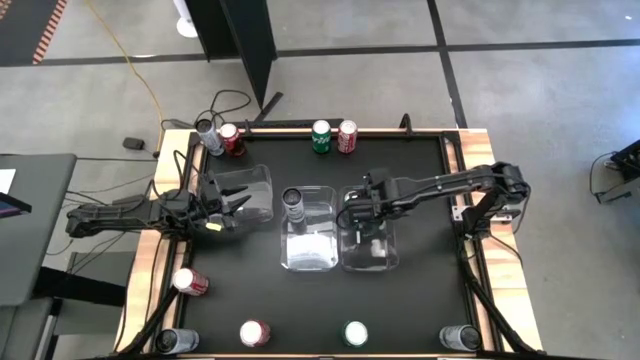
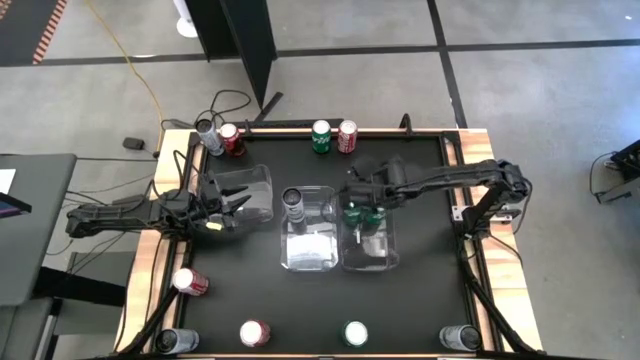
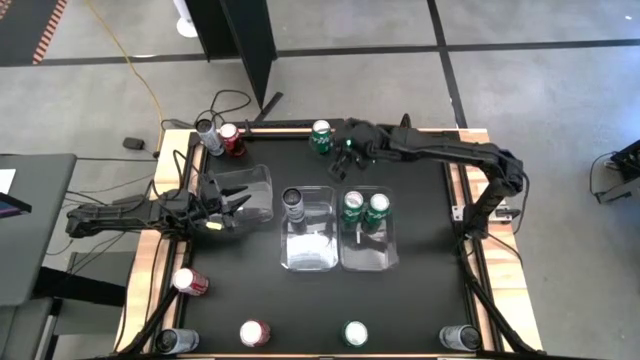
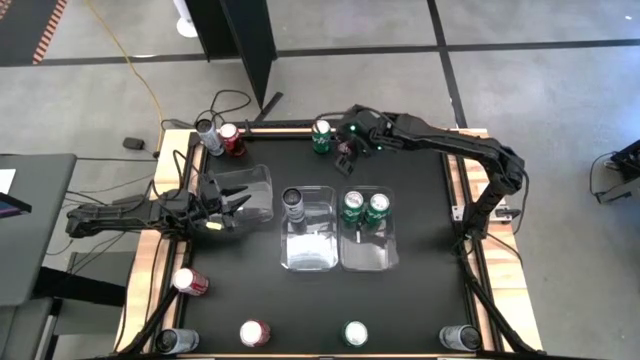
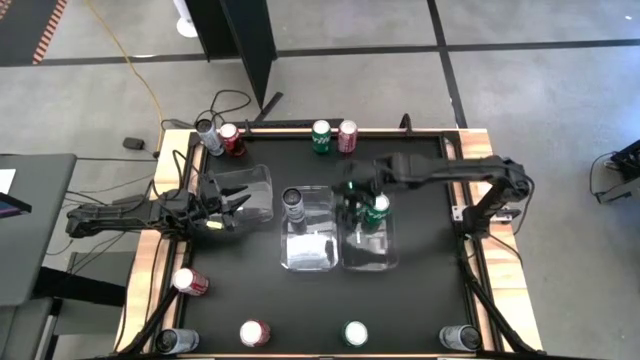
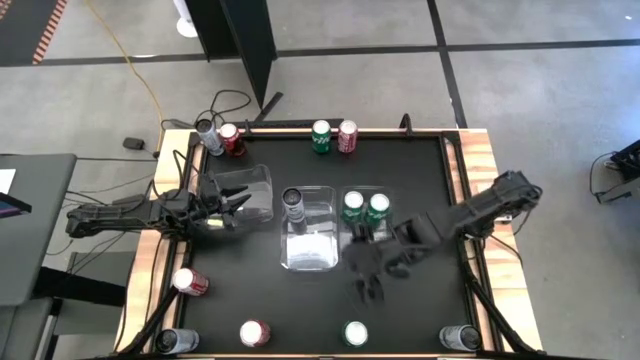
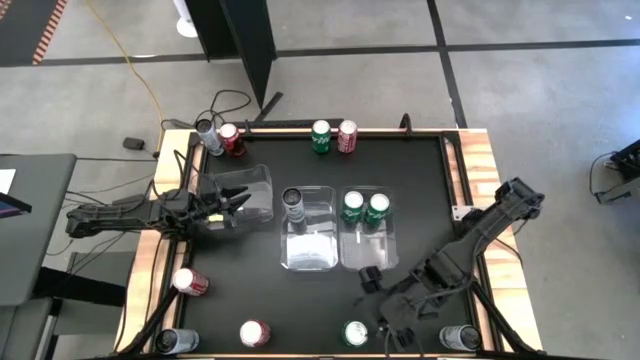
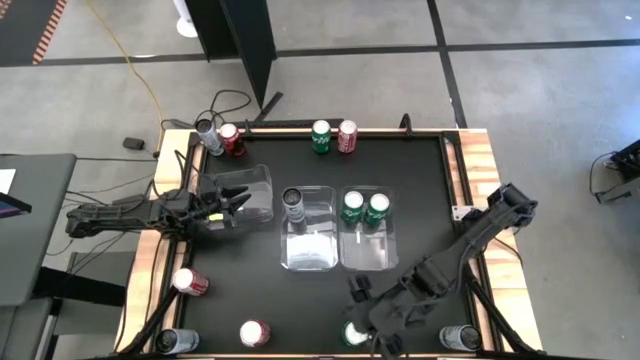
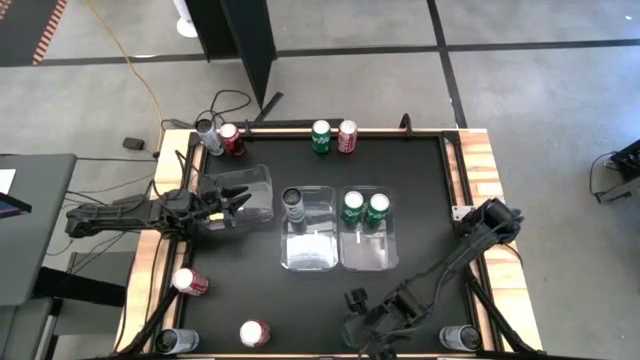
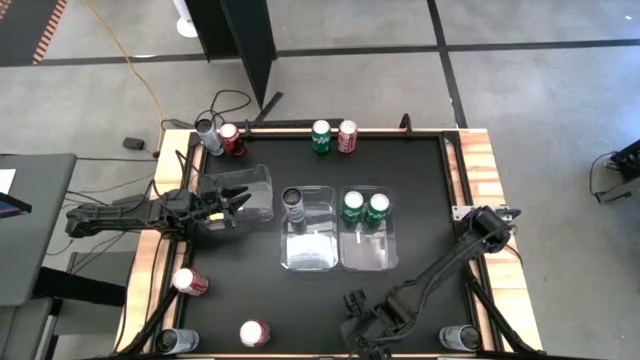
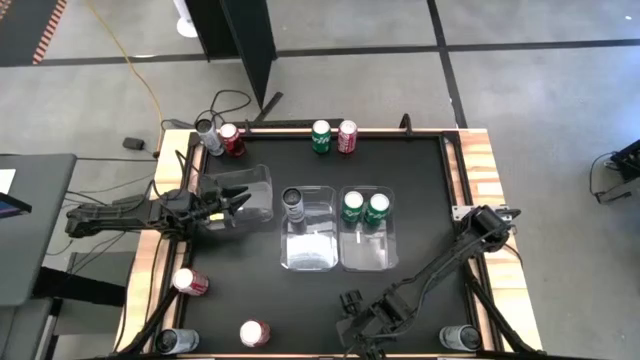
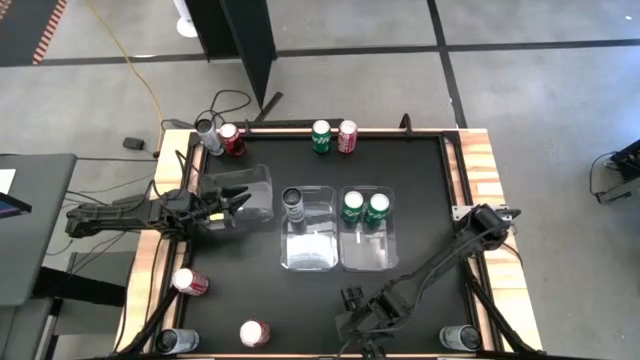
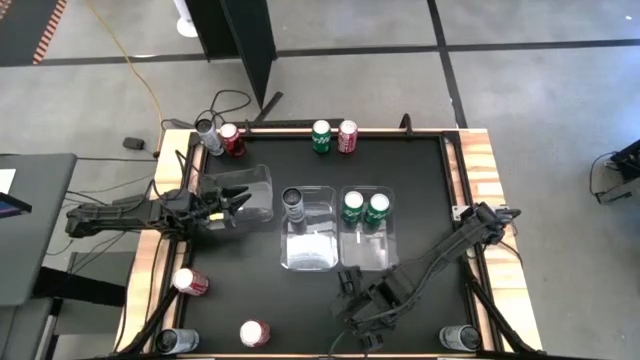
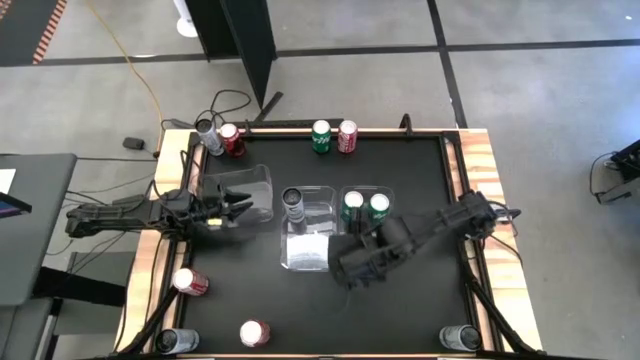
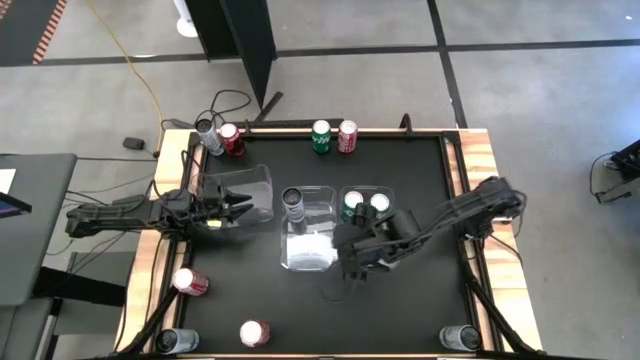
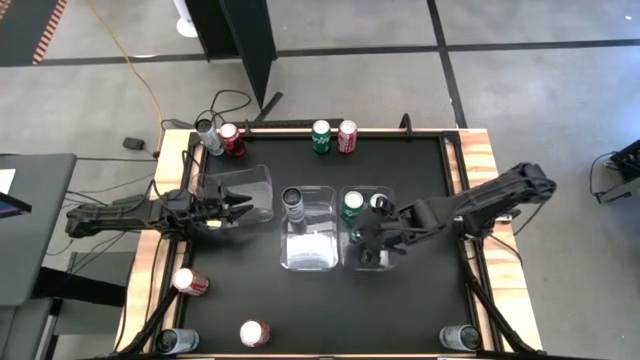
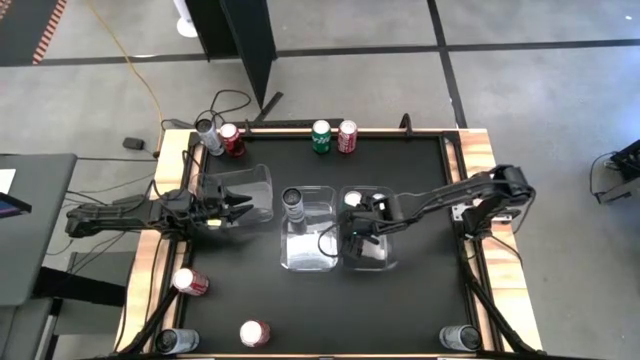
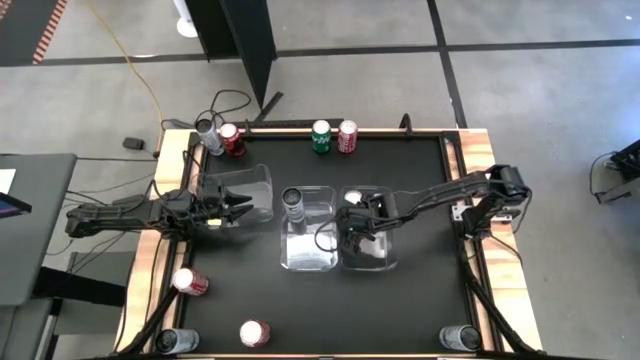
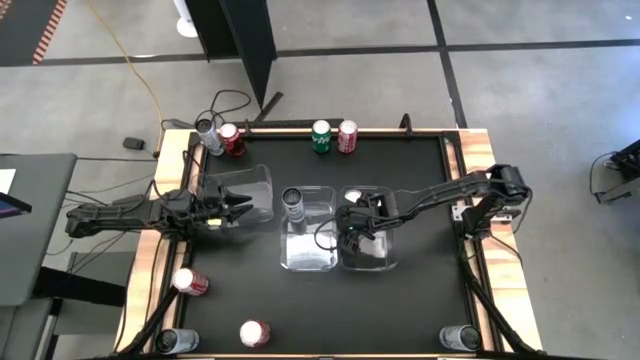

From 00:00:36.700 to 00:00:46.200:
Task: Sort soda cans
Put the bottom green soda can into the right transparent bin

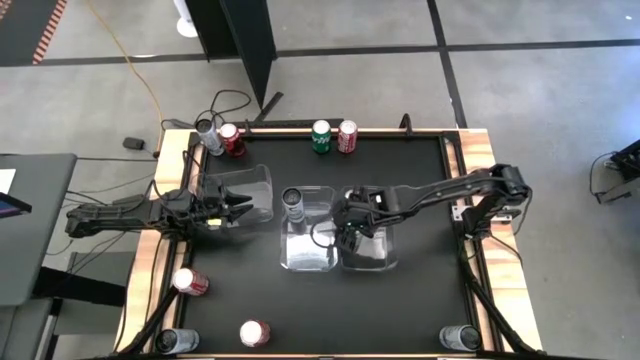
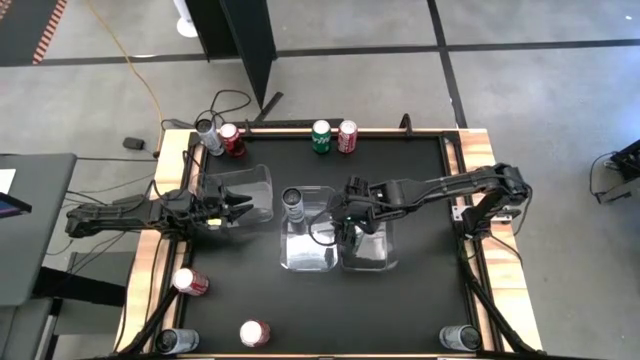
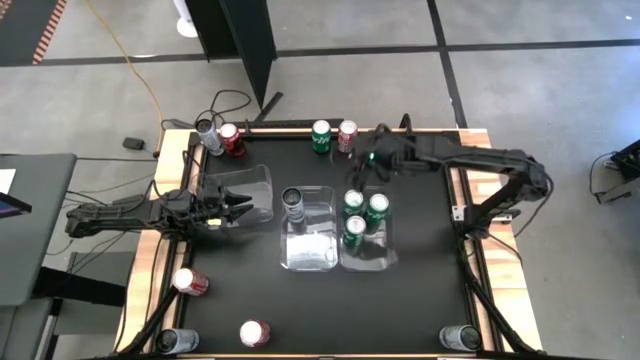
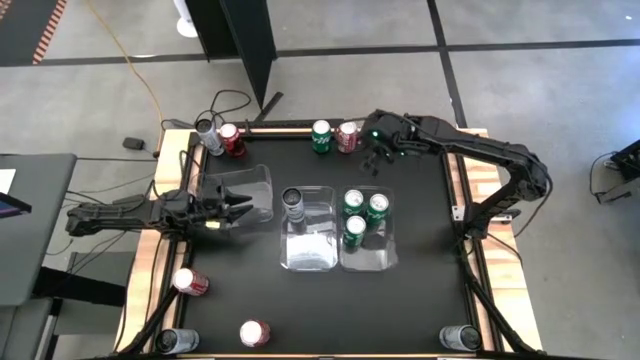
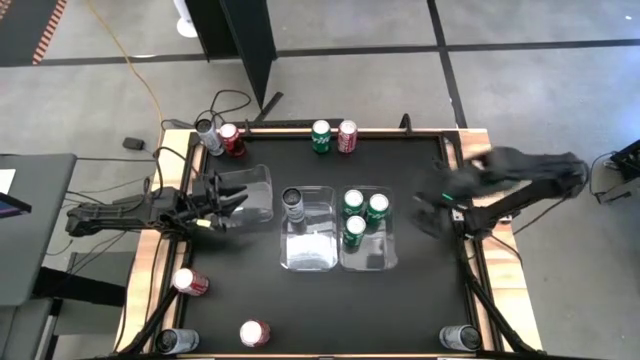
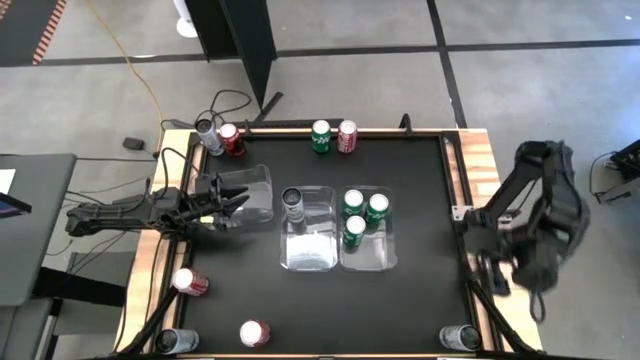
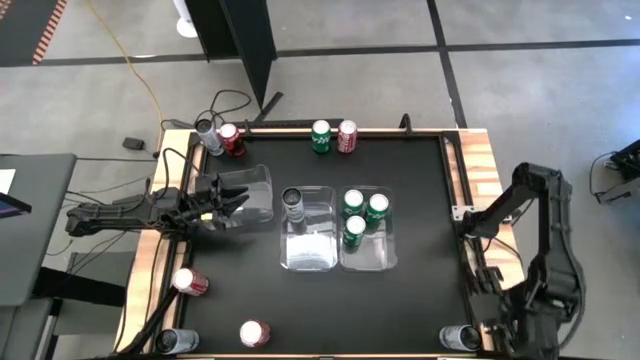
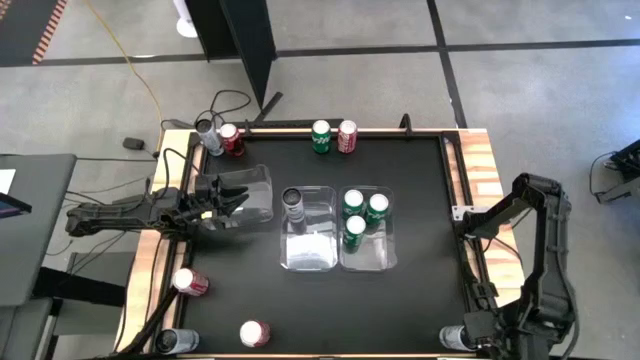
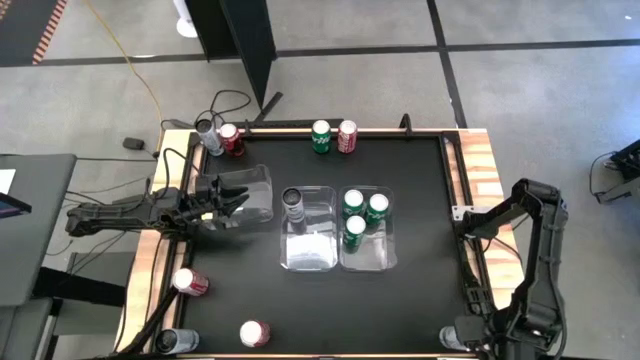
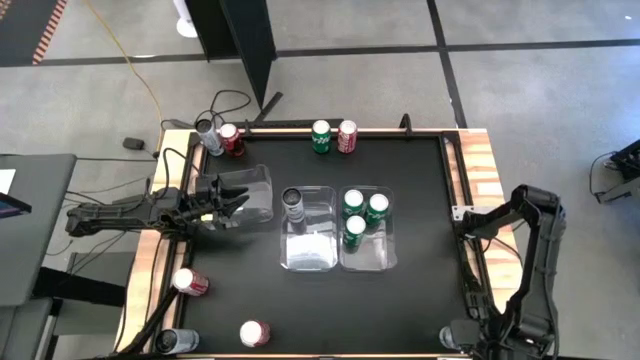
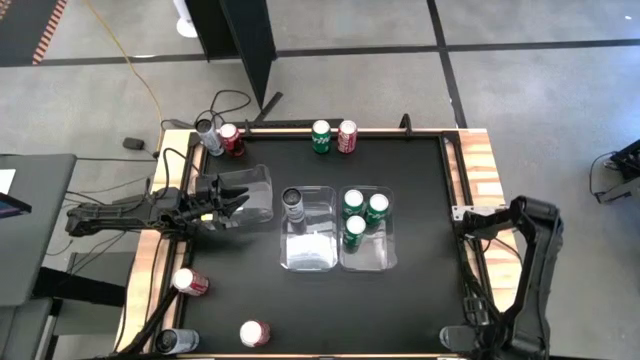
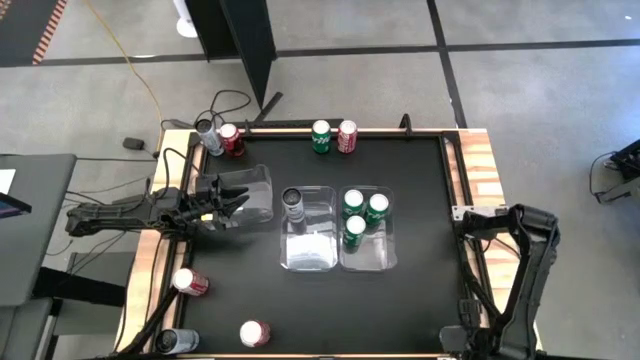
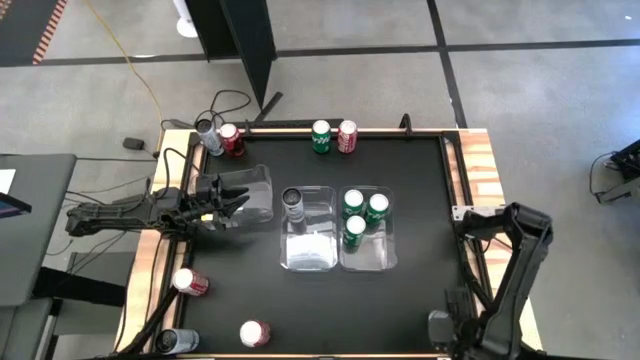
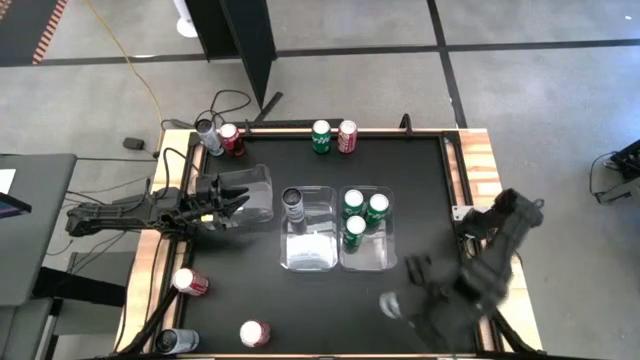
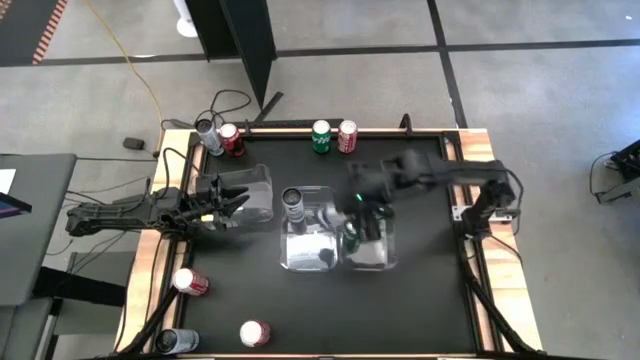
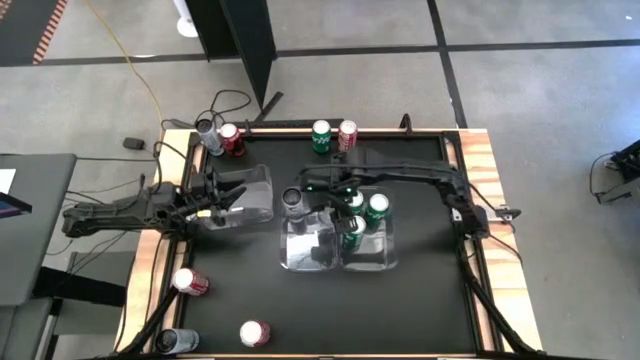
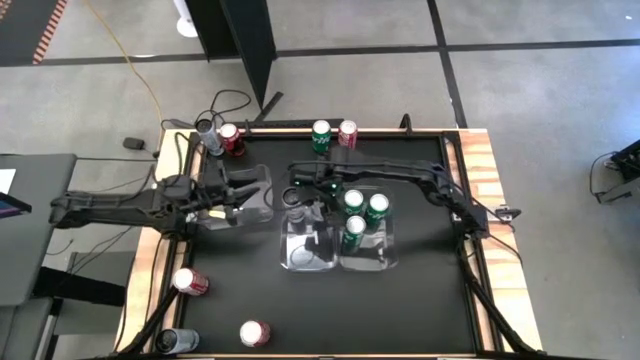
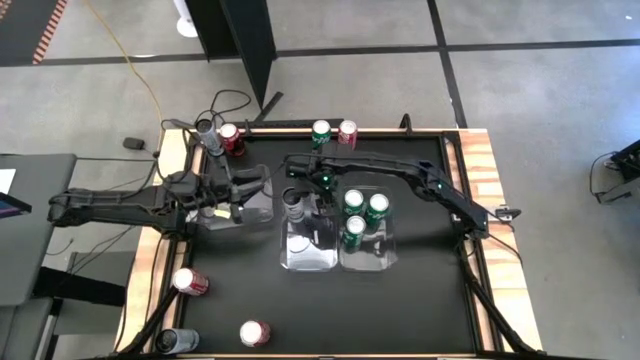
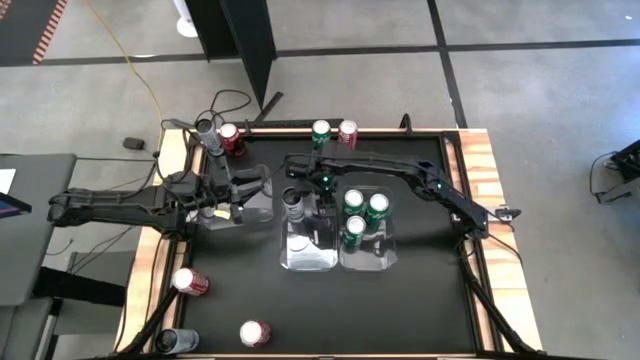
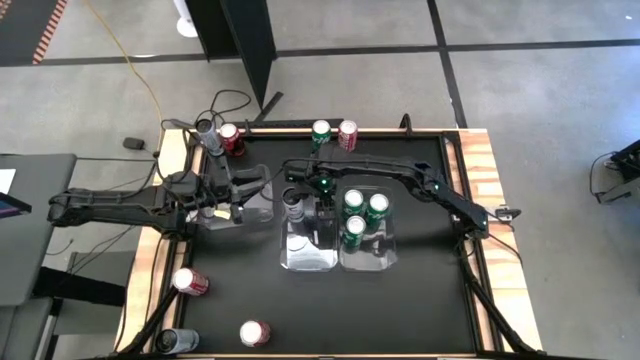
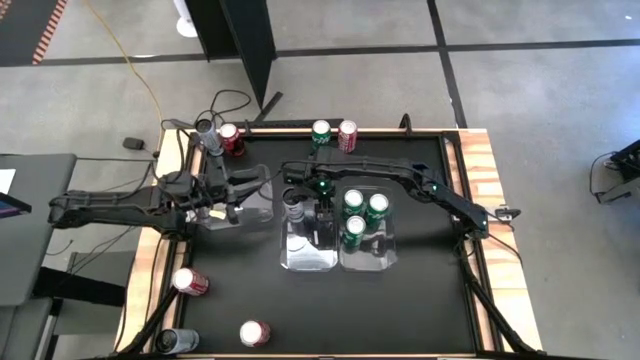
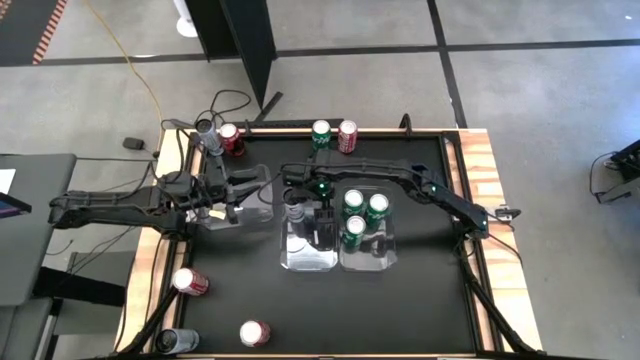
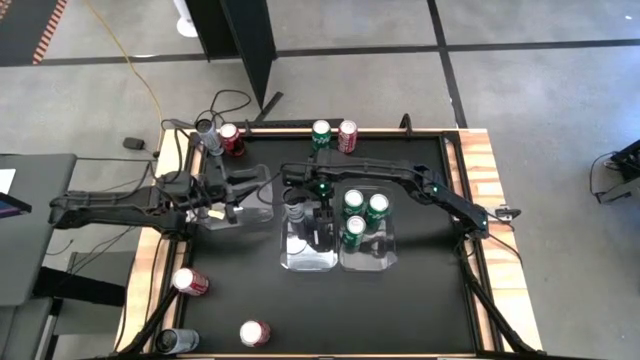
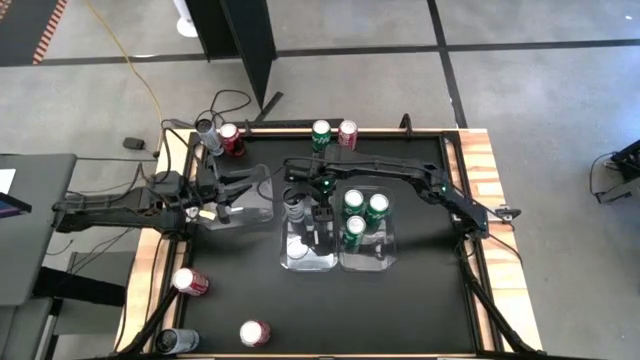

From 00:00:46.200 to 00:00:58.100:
Put the bottom right white and blue soda can into the center transparent bin
